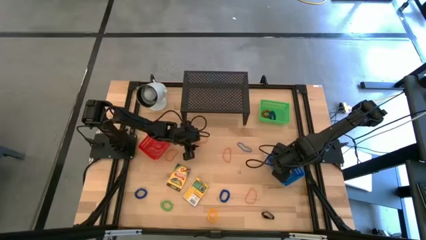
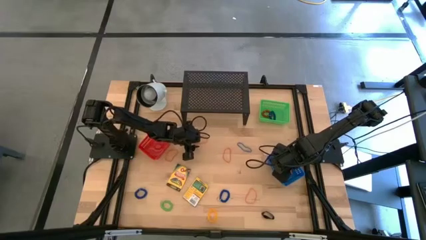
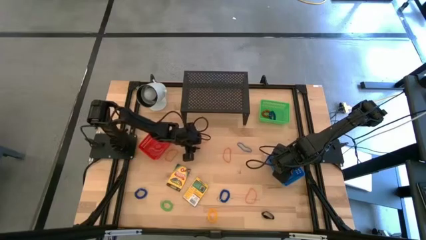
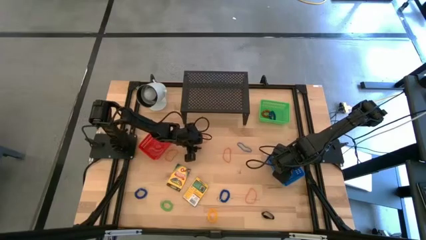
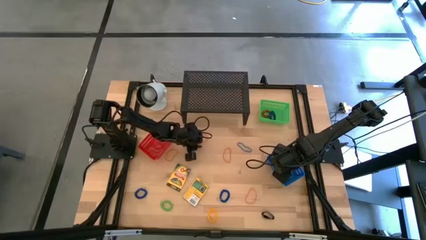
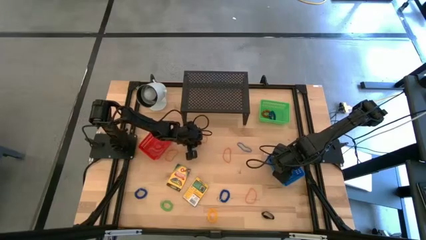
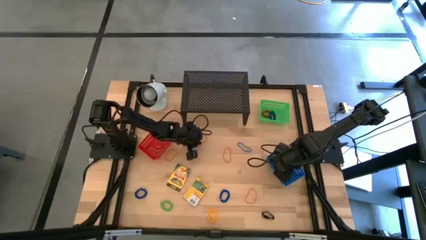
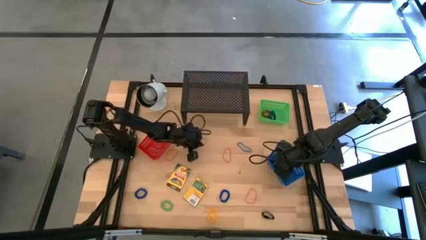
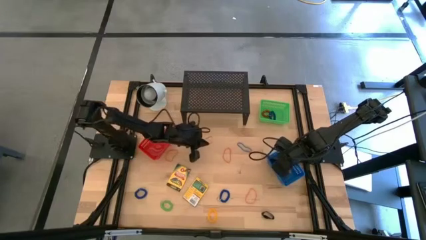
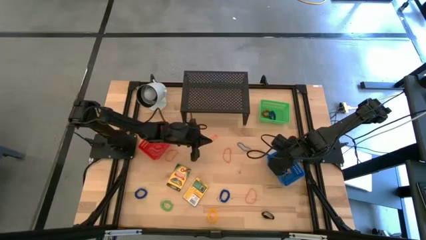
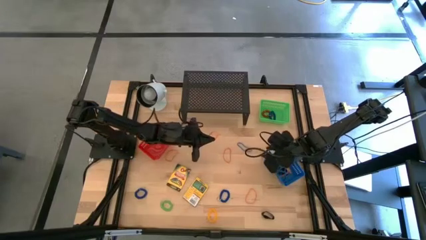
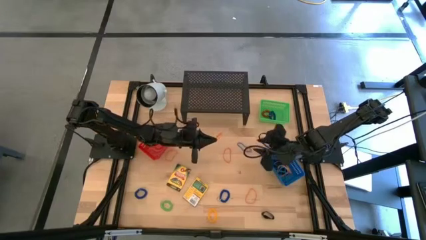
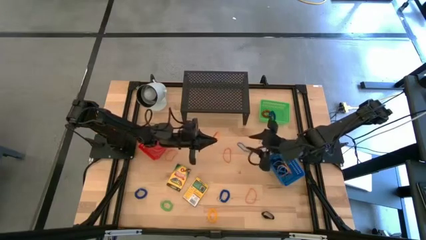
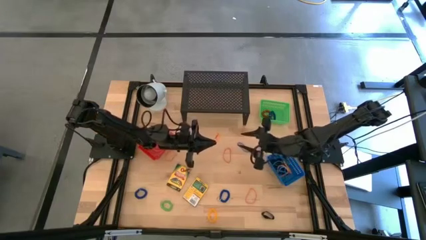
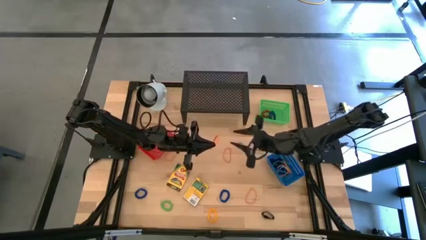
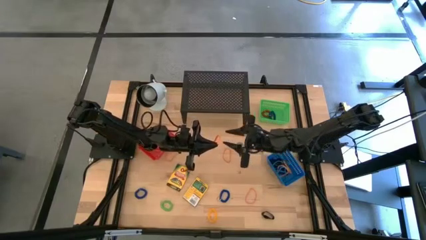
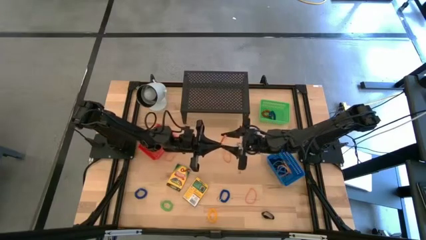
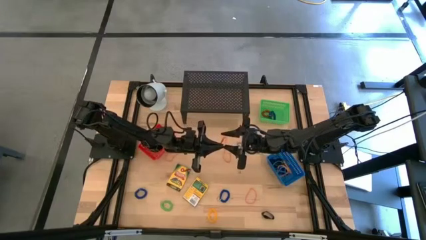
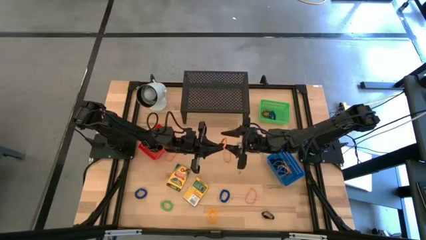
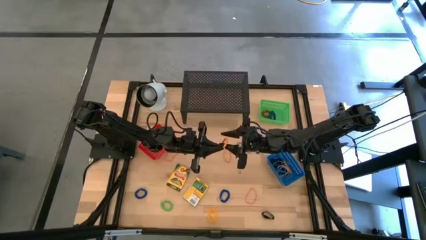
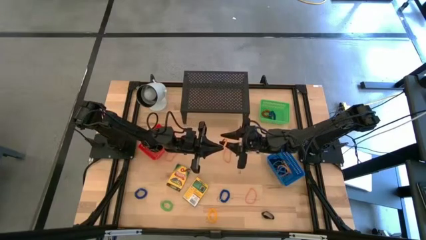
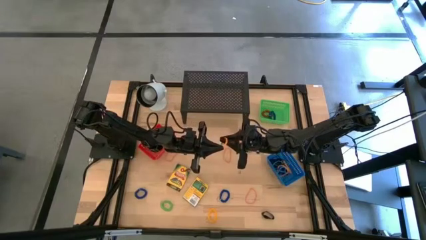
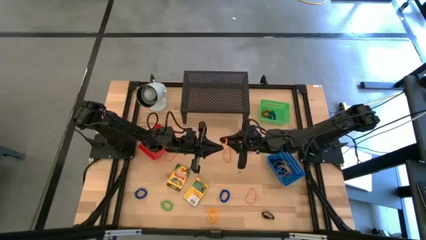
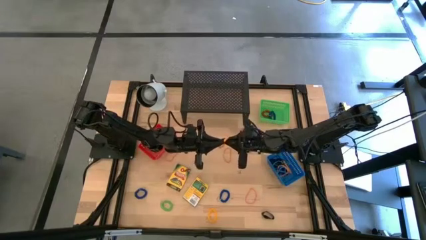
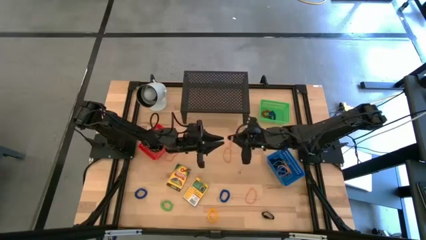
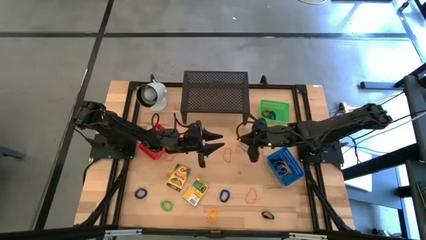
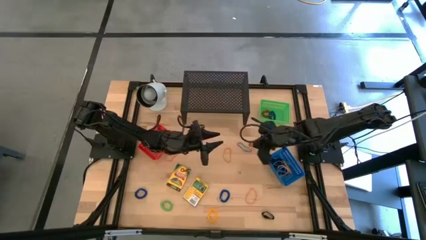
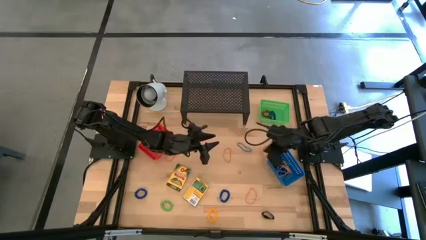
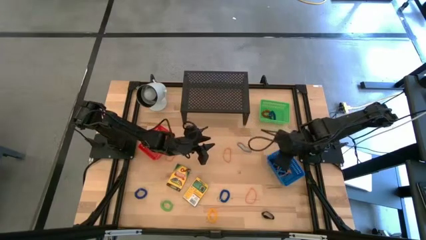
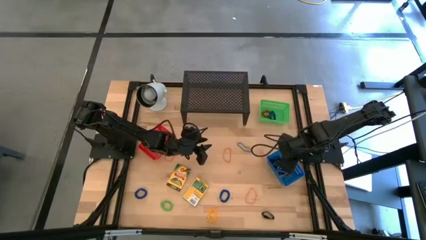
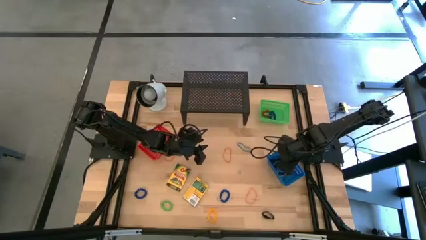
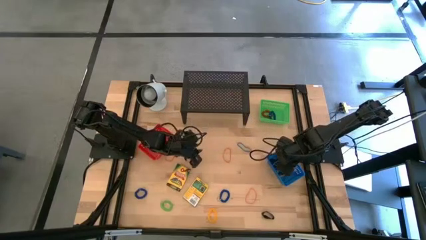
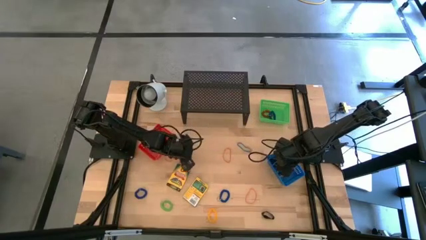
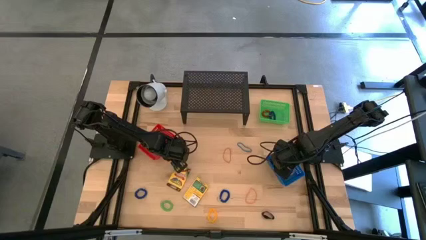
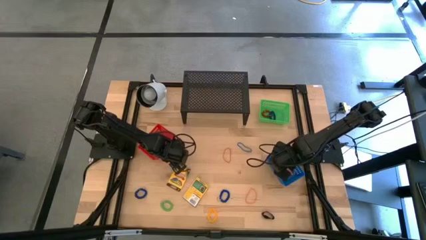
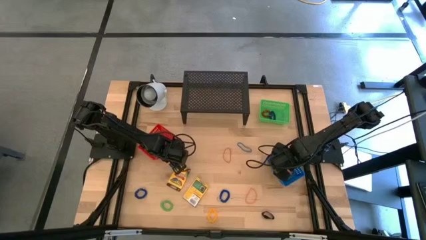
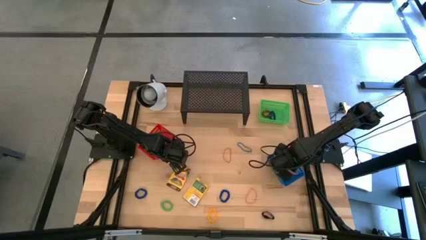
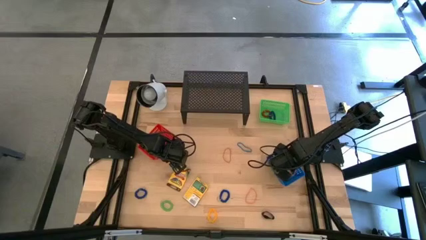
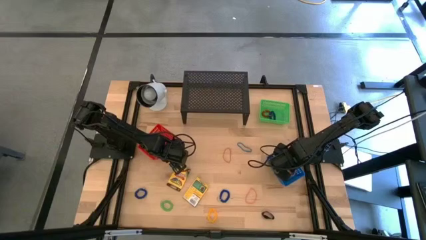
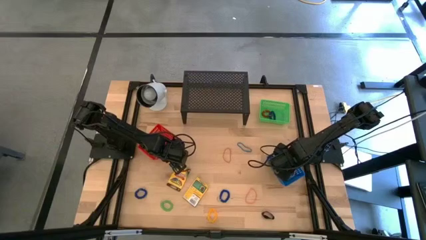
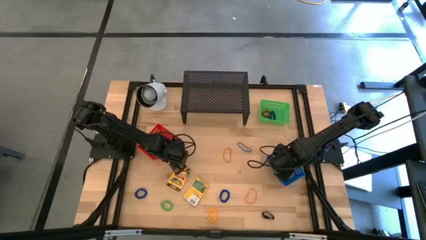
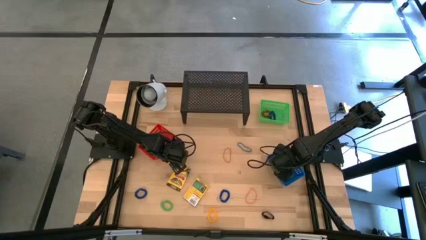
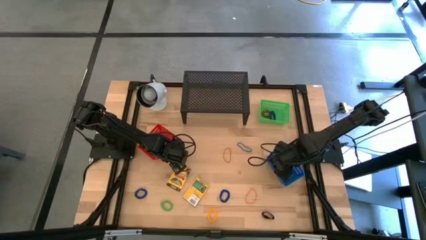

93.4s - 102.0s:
Task: Pick & Place Office Desk Supplies
Put the orange rubber band into the blue bin

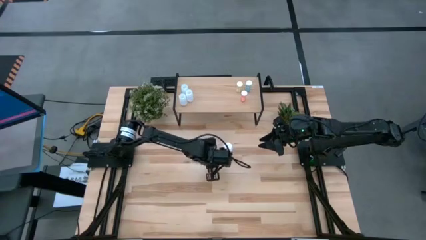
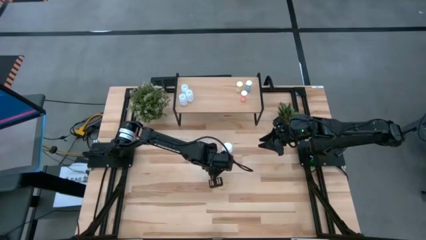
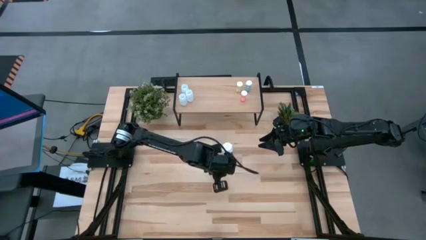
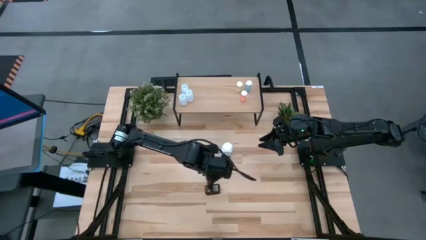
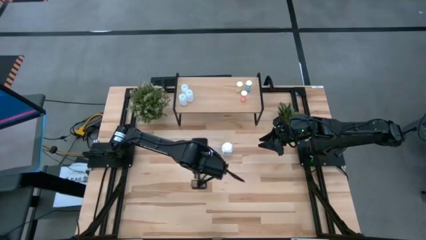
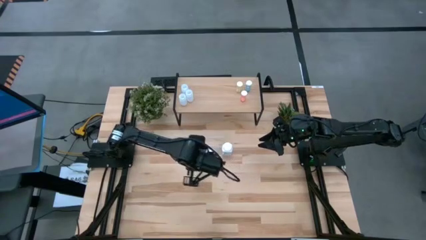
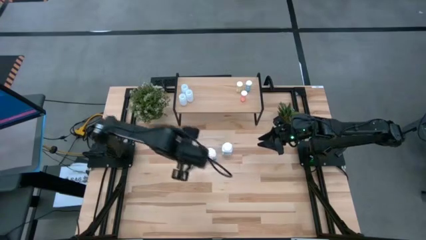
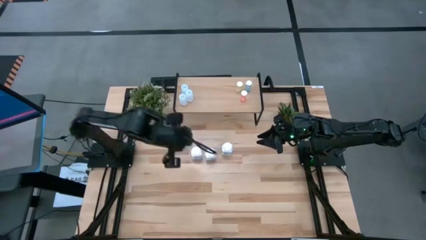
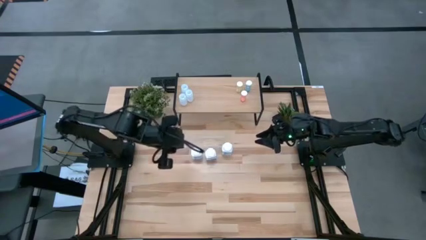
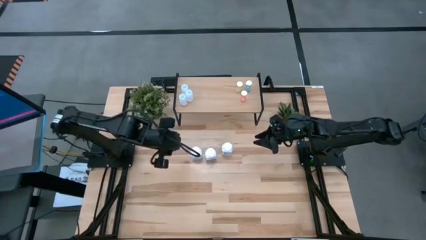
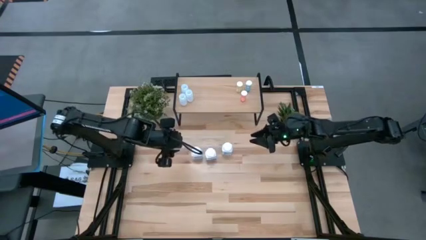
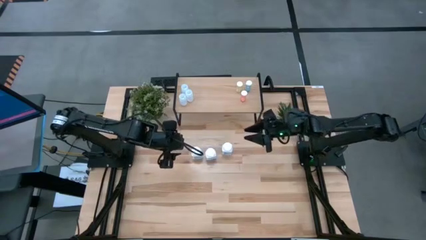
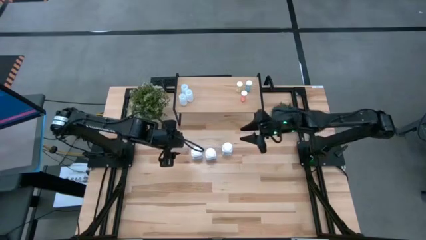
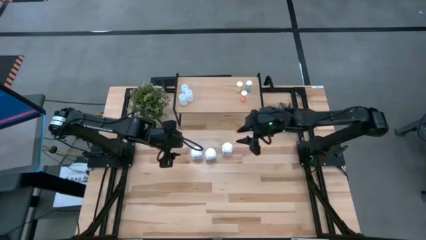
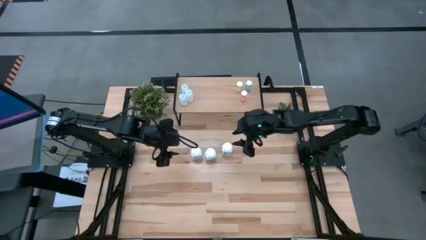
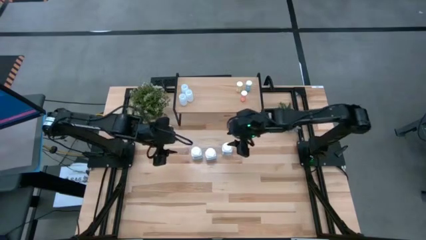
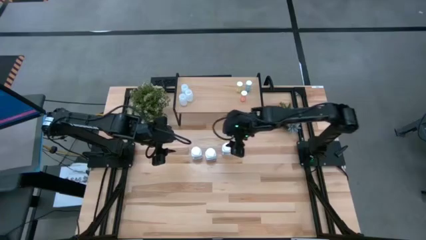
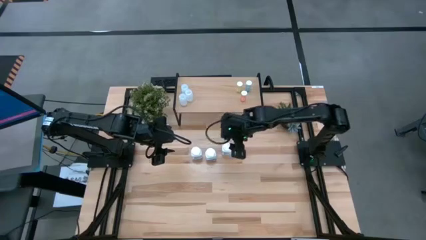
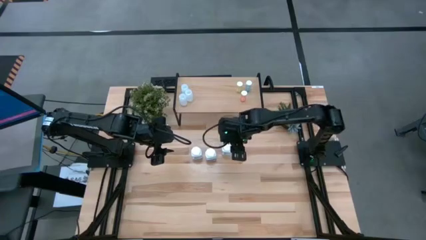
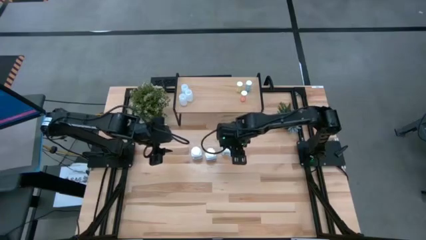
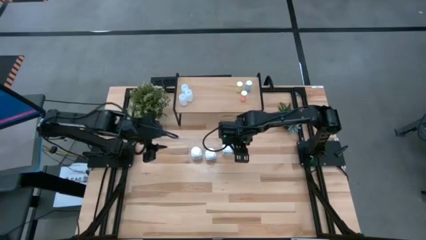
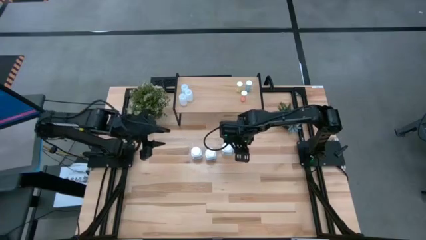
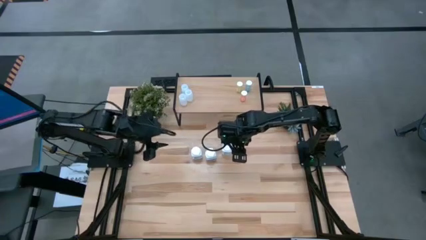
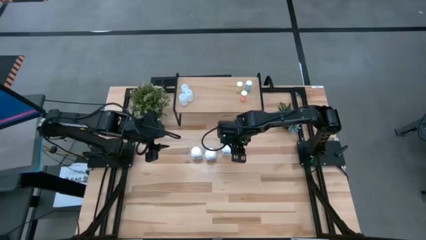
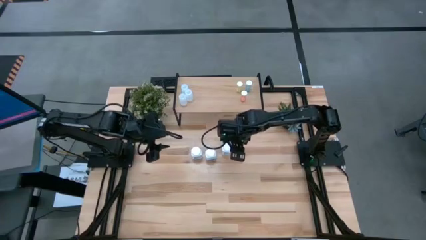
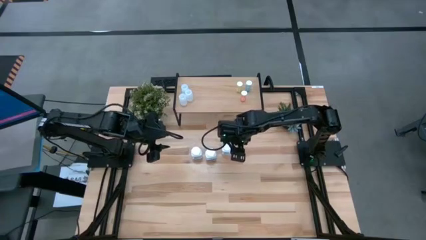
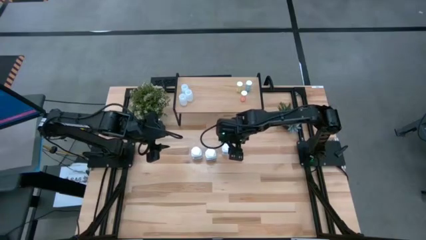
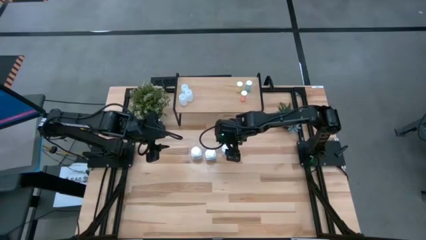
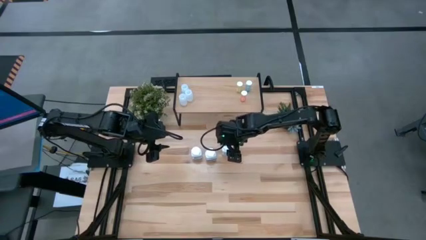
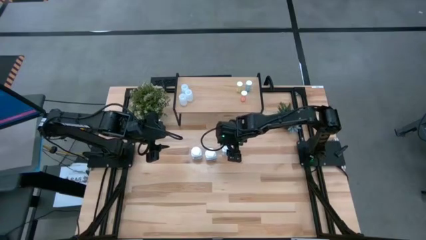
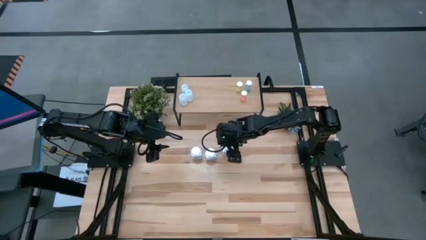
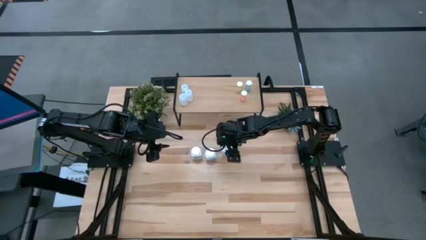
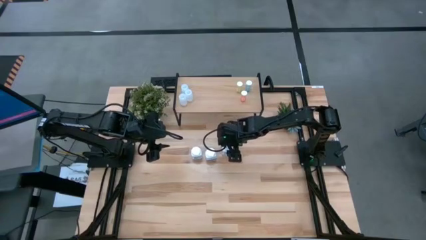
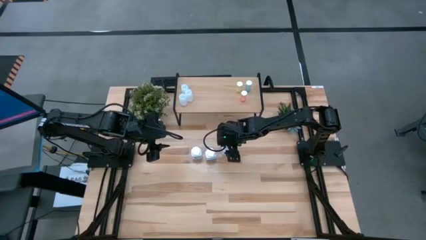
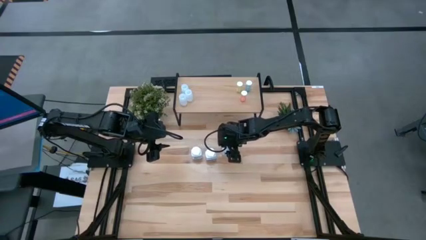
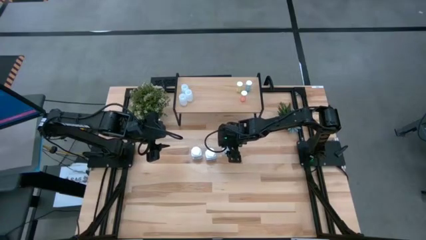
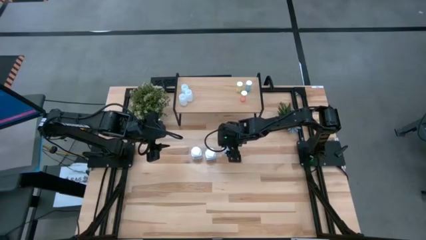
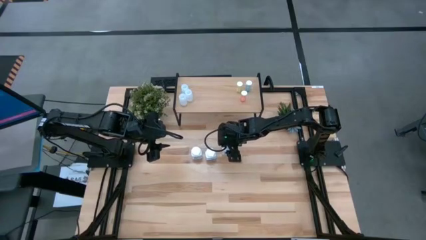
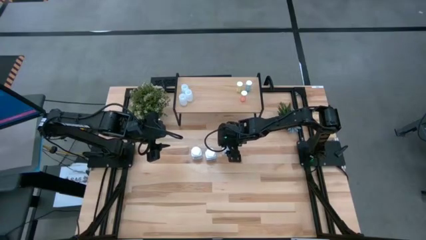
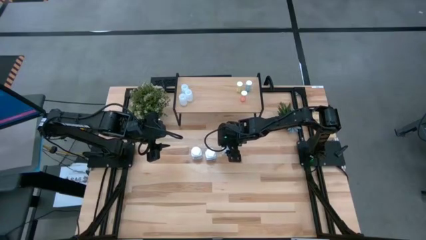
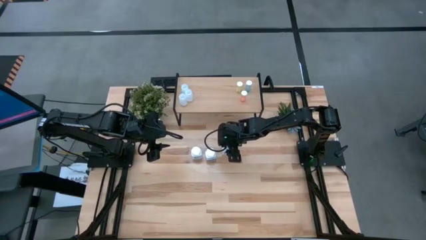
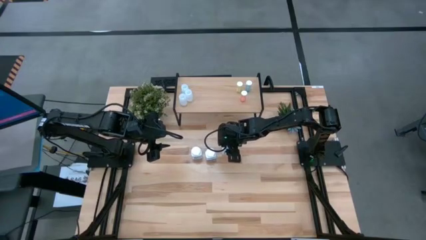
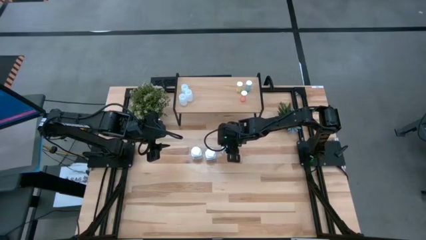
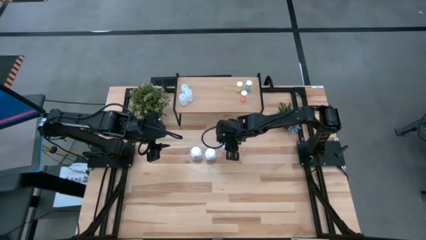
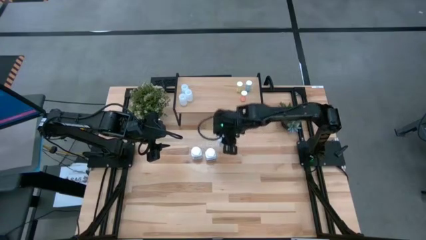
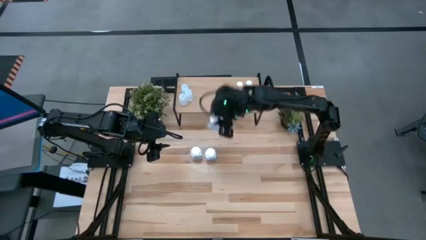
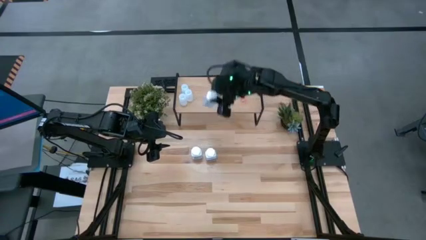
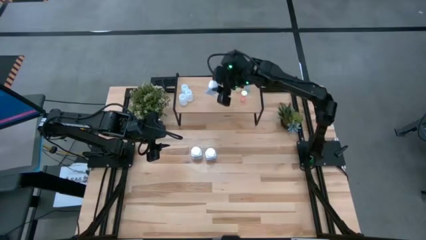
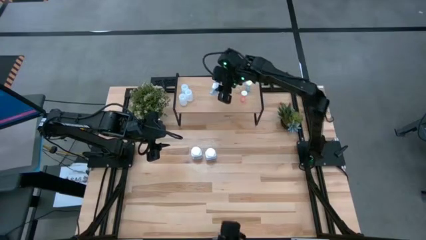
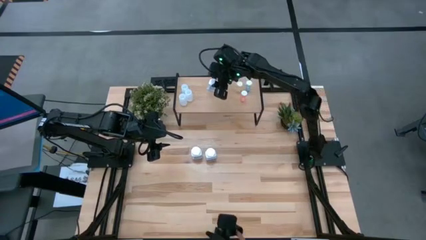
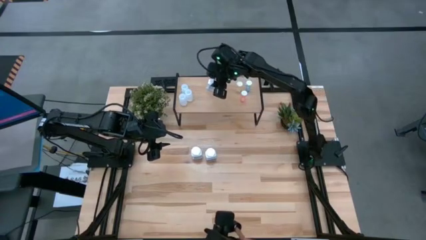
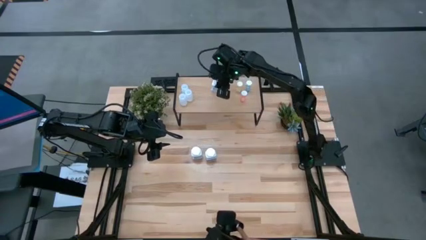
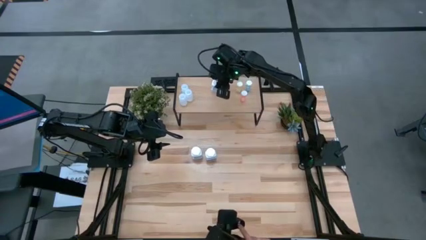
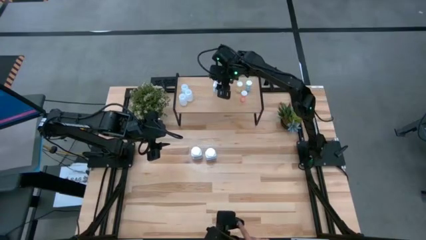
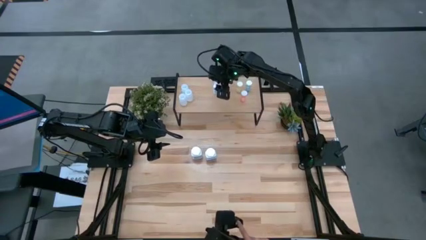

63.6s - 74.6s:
Task: Pick and place medicine bottles onto shelf by color
Put the right white blue pill bottle on the shelf
